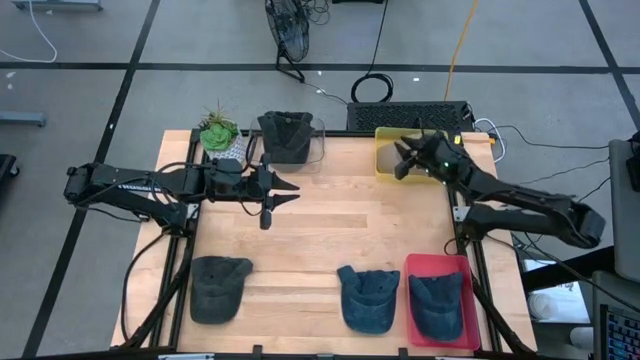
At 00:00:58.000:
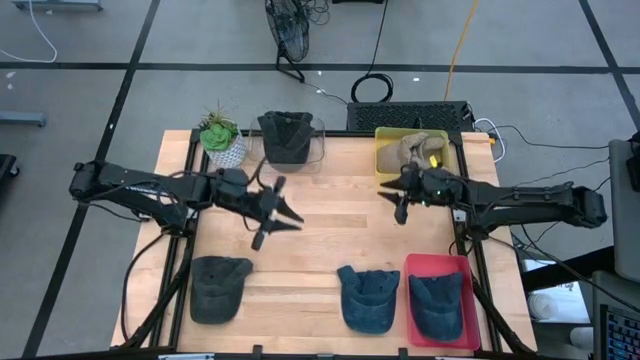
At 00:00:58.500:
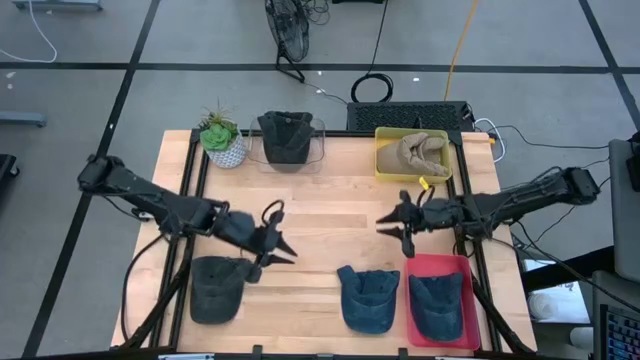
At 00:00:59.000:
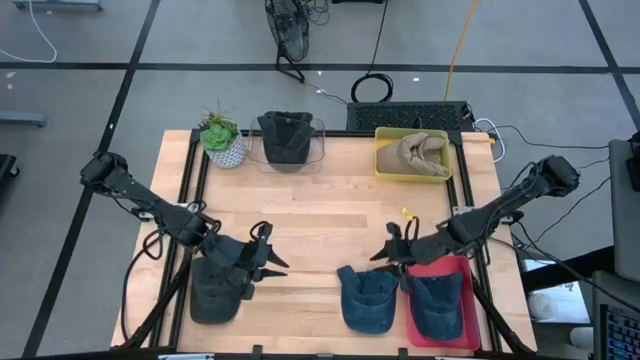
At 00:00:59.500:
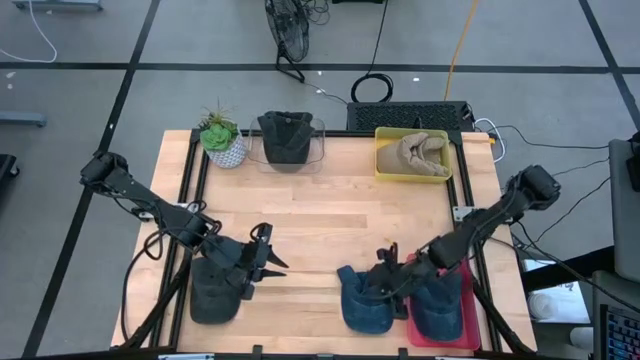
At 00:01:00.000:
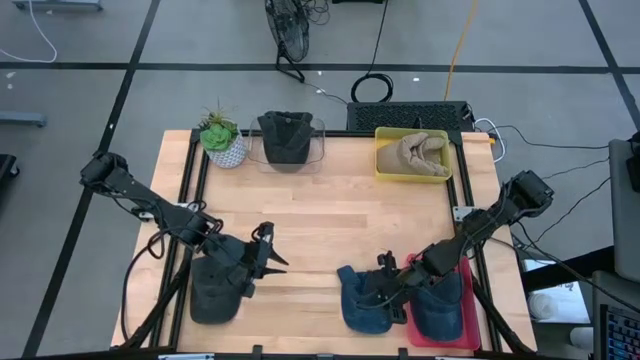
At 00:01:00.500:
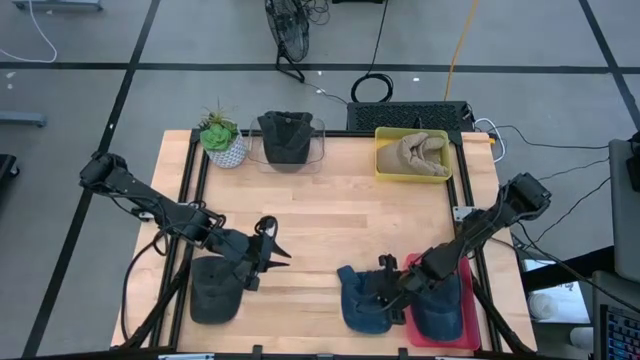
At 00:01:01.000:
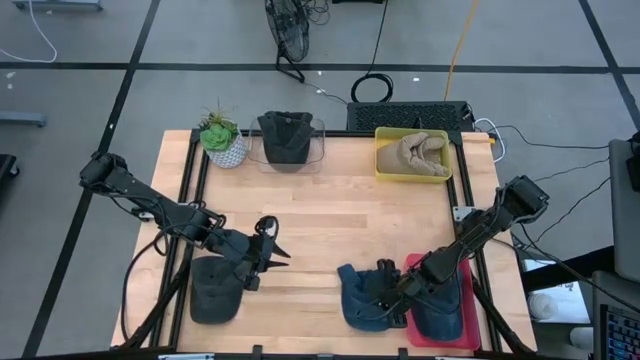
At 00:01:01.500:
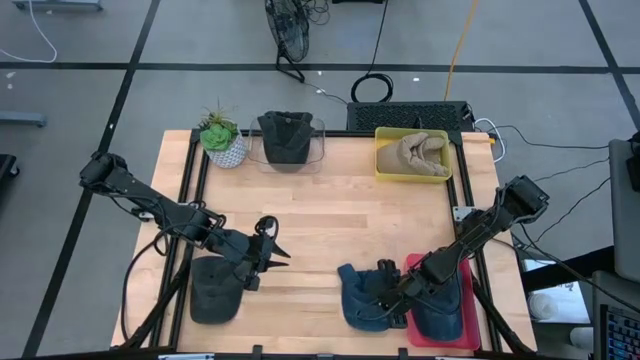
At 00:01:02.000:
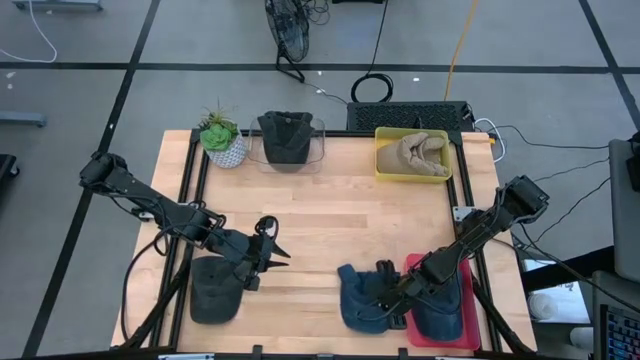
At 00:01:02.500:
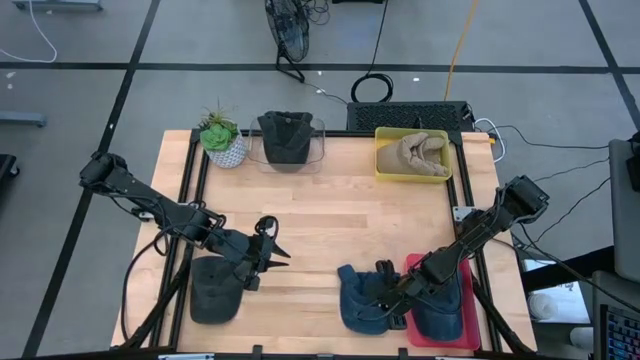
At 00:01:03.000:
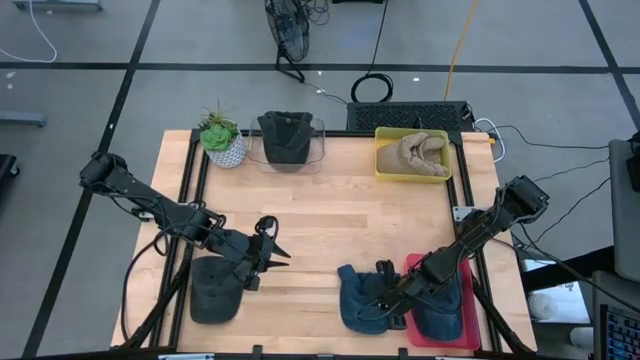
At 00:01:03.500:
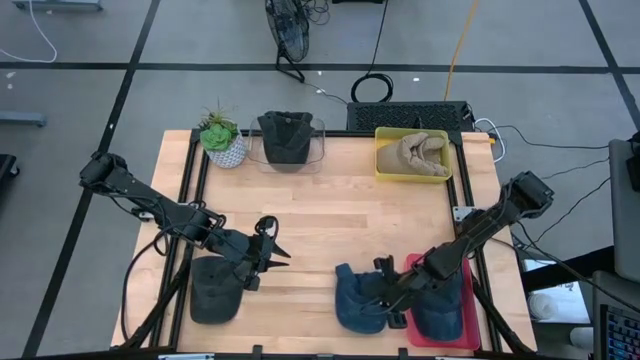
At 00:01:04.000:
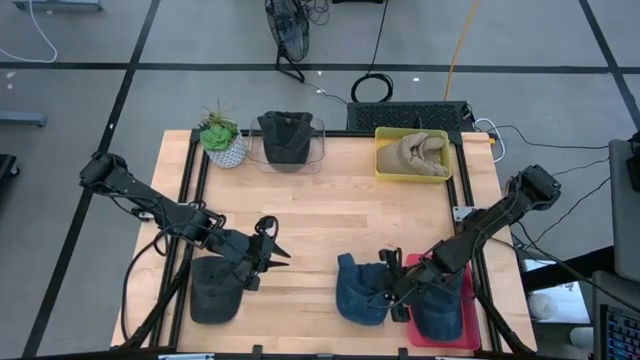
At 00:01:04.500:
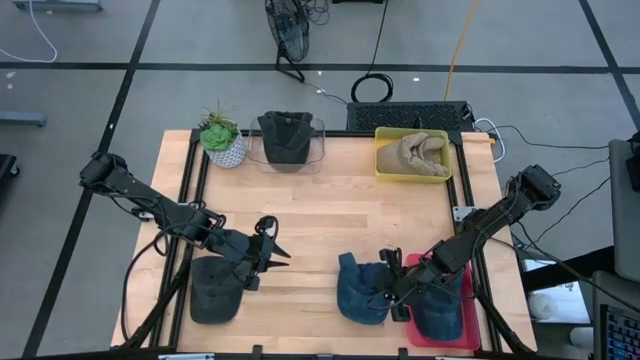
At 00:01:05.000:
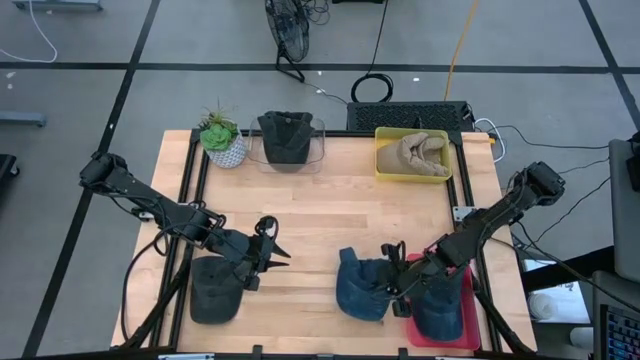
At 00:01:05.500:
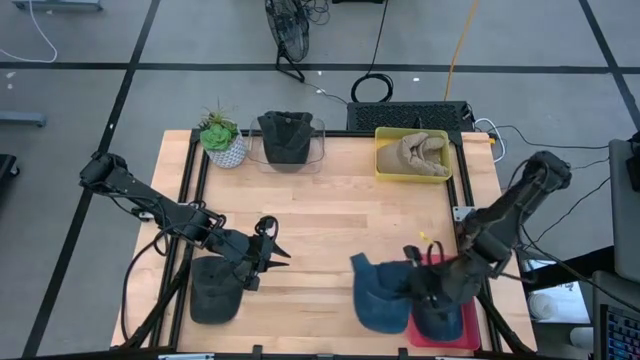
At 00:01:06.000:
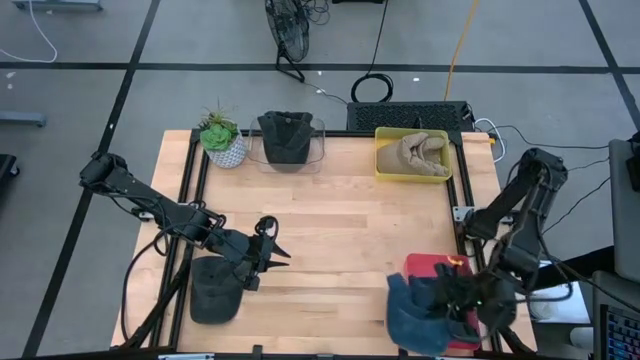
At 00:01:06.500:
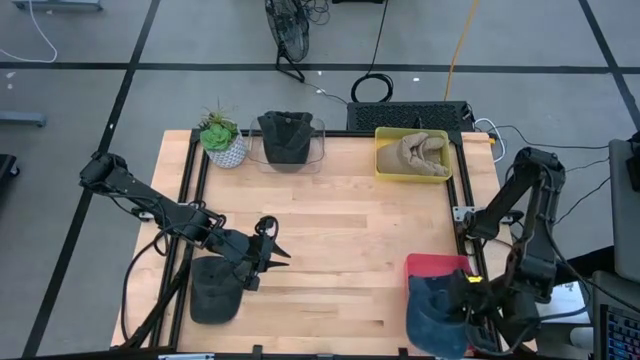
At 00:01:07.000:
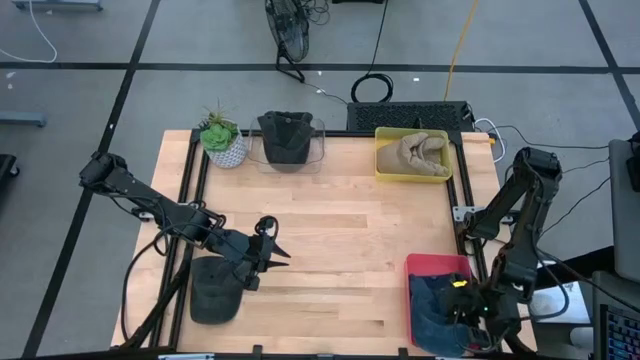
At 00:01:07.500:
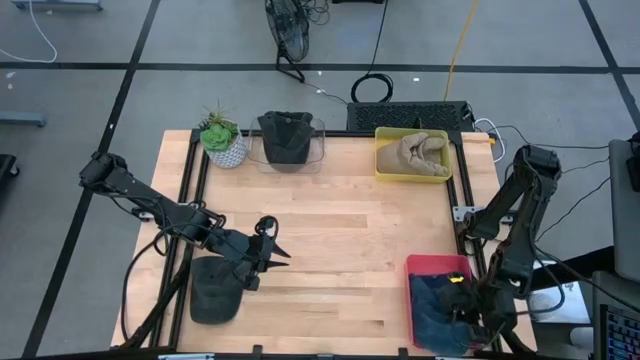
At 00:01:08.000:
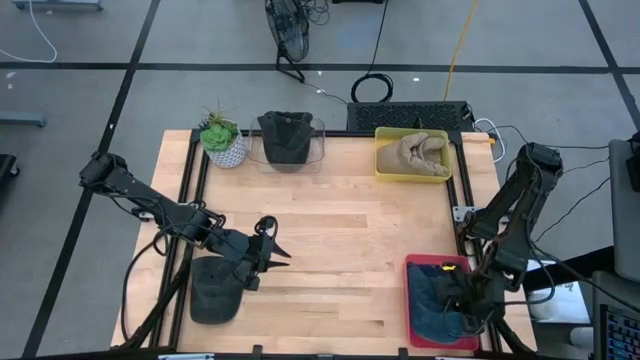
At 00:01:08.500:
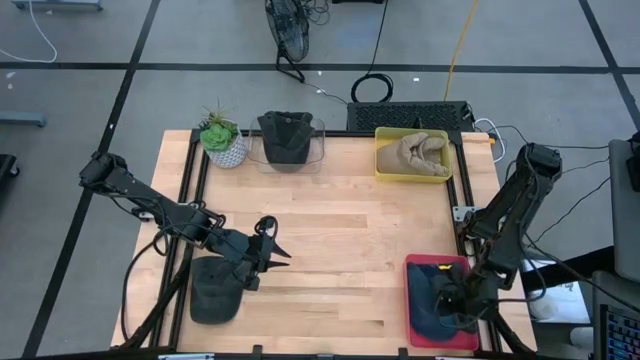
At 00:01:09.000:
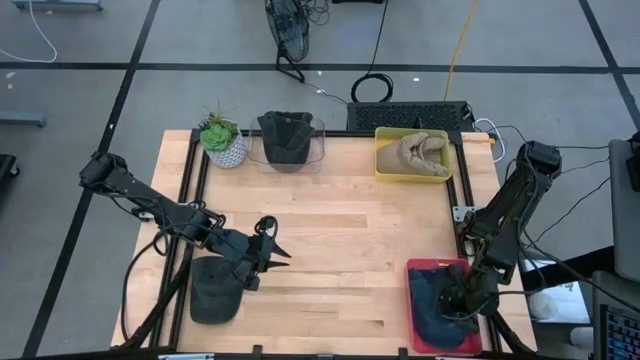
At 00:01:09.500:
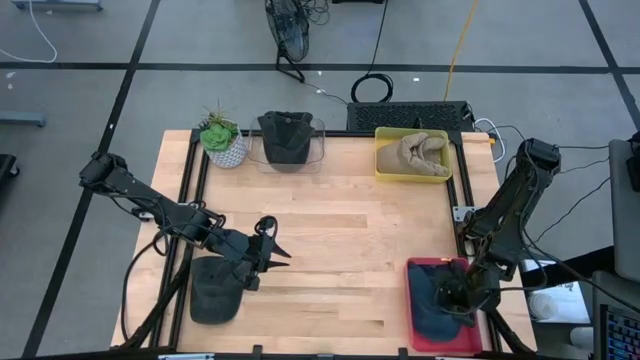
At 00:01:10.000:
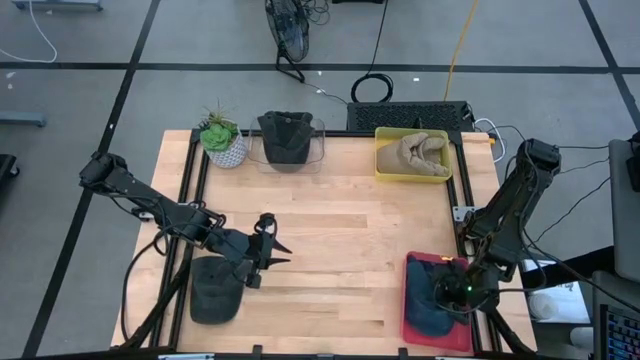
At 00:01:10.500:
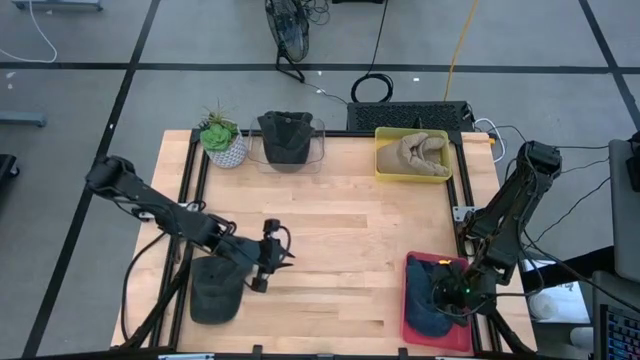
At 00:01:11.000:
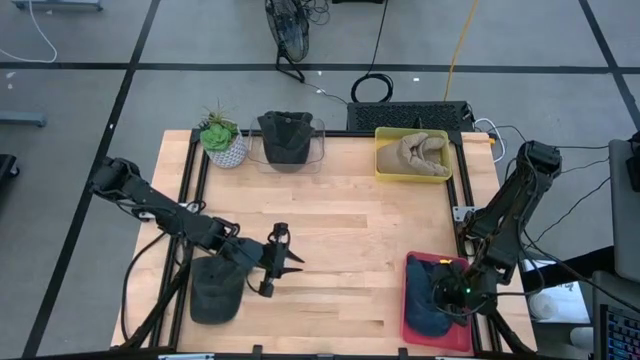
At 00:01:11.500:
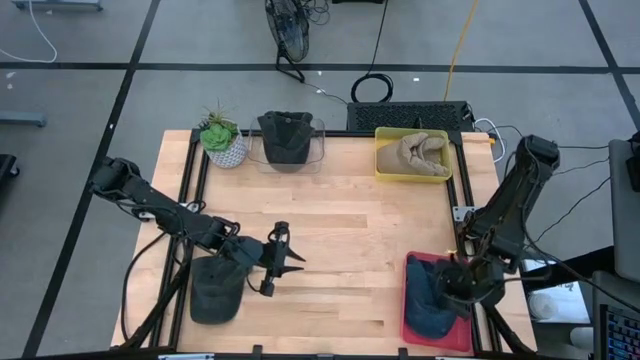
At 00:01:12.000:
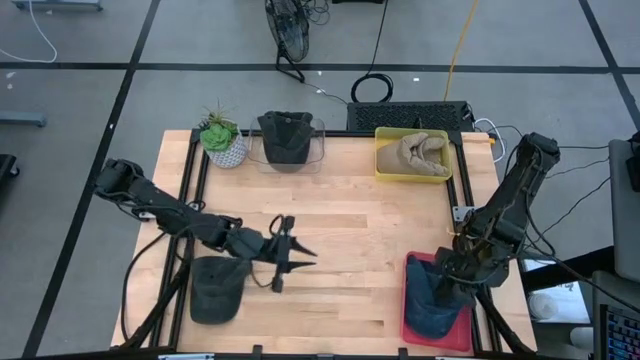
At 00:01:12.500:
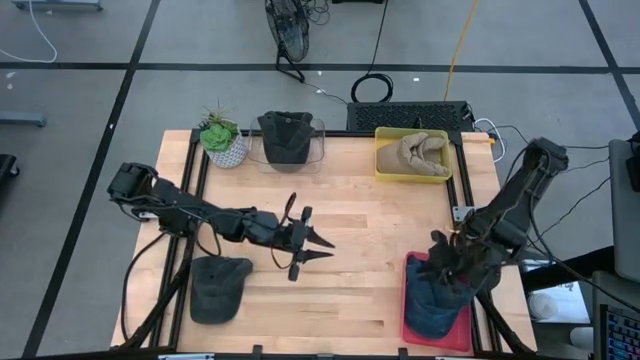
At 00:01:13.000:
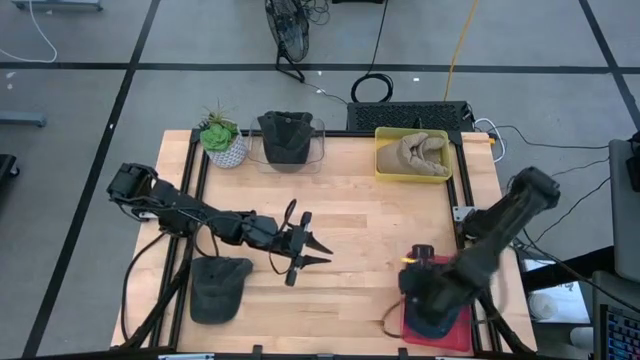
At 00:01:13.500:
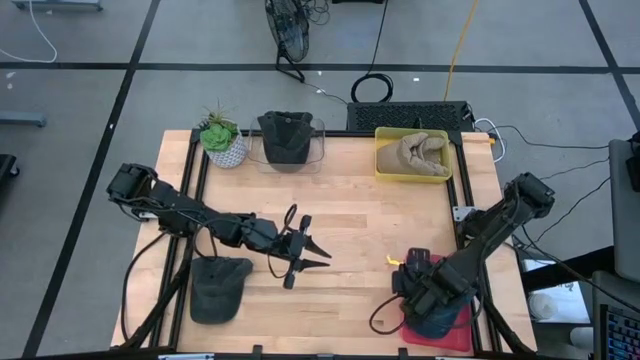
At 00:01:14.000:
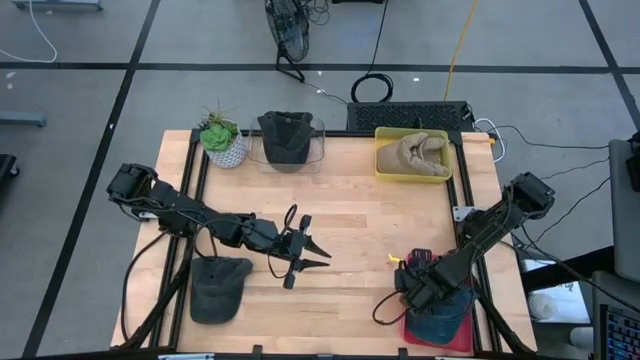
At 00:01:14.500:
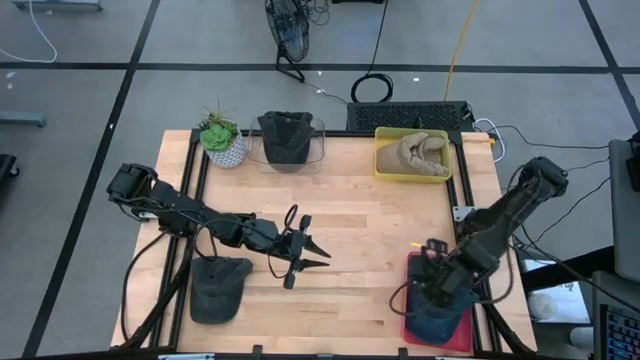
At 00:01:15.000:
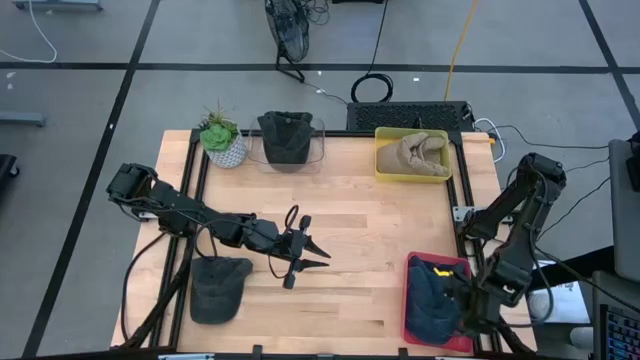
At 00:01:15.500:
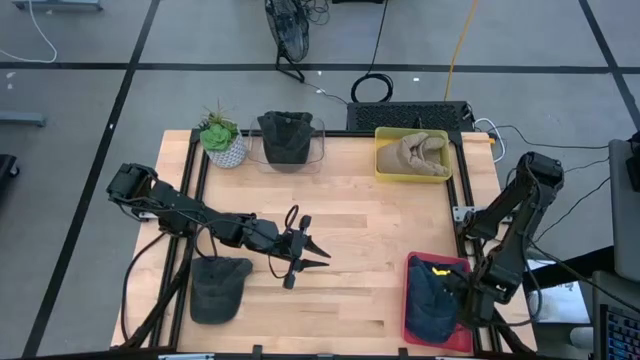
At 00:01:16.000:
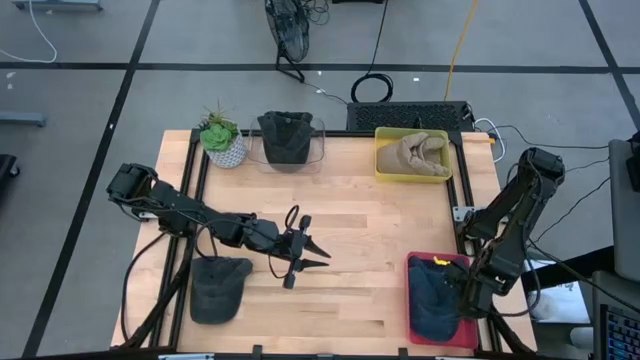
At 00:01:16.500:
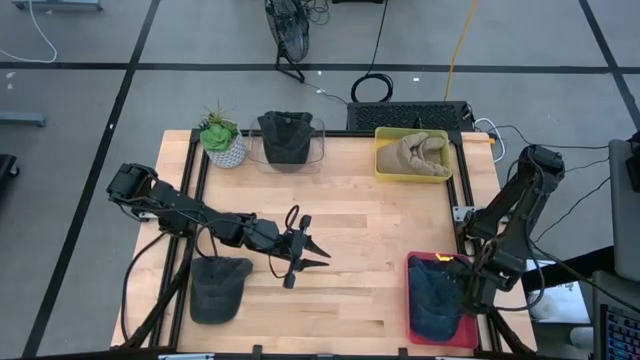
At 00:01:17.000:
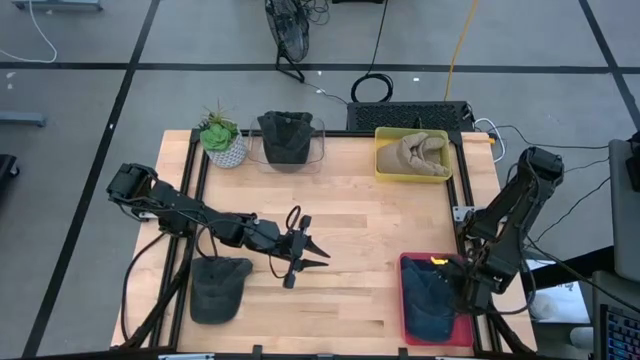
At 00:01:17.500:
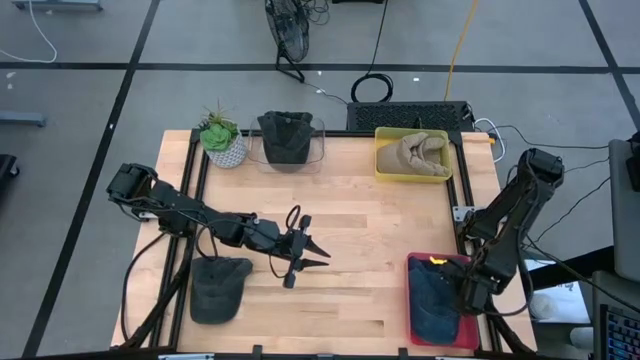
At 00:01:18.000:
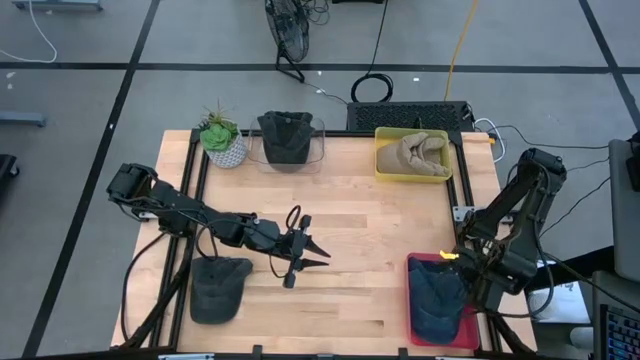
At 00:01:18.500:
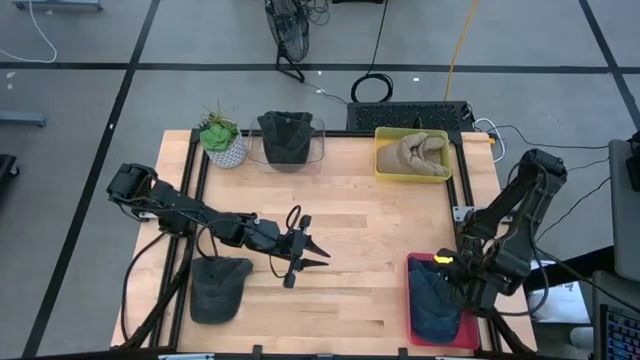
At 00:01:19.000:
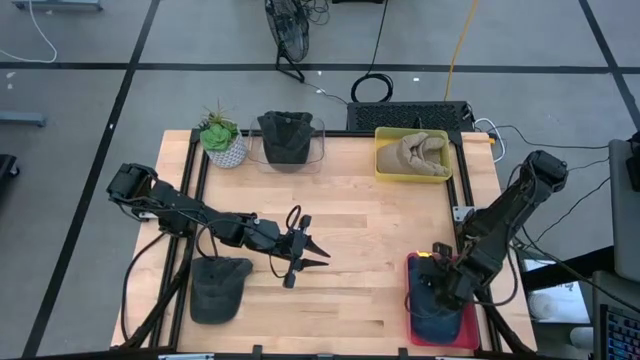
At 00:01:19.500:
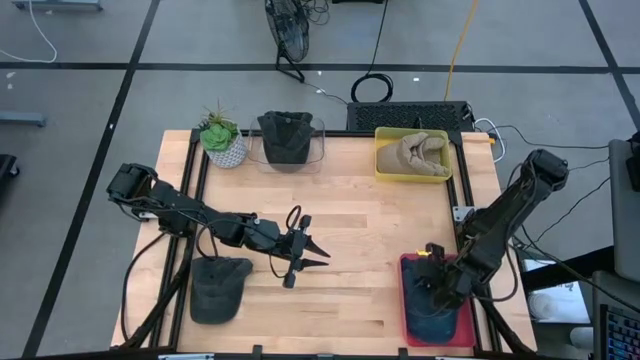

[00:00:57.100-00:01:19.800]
Task: Pick & Place hat
Put the blue cap into the pink bin
